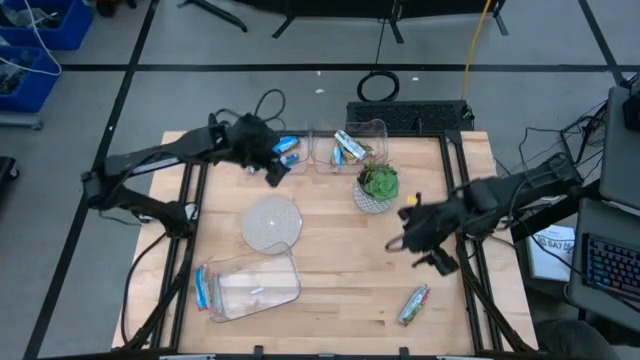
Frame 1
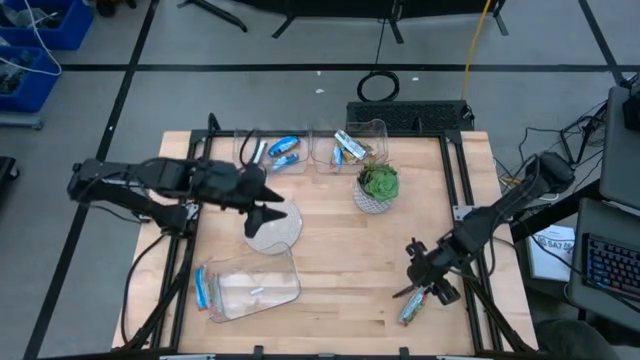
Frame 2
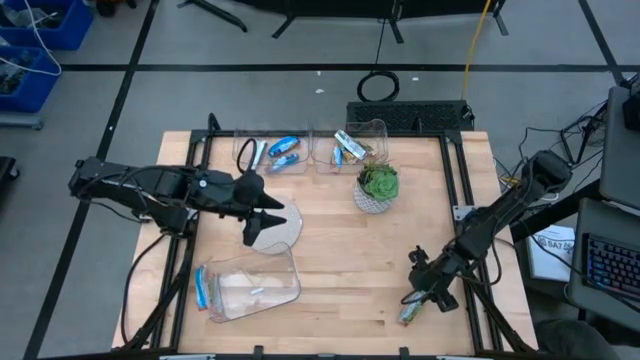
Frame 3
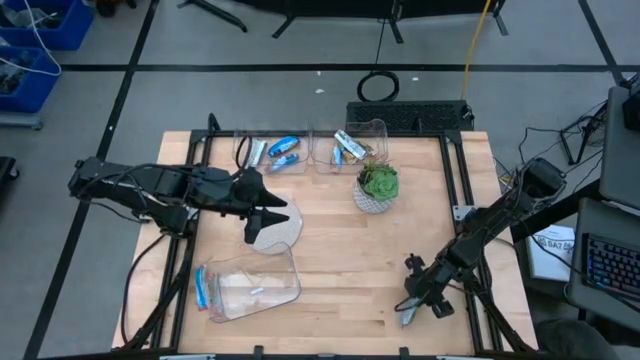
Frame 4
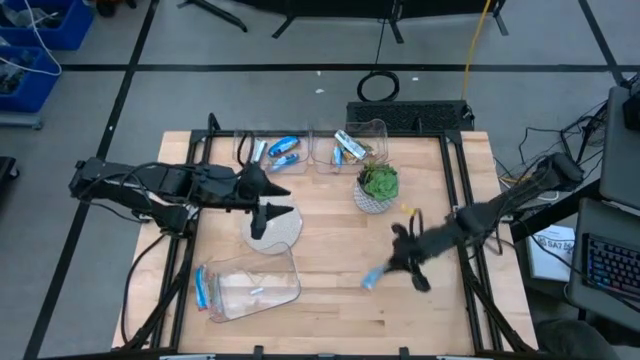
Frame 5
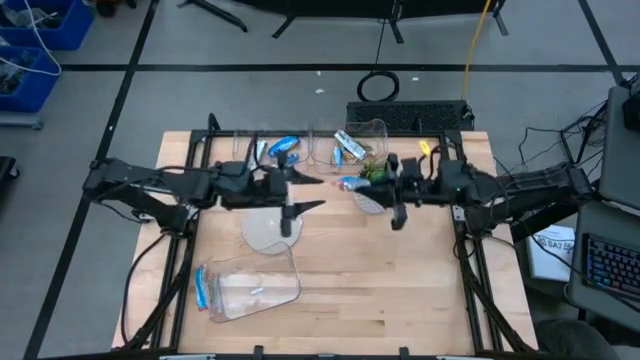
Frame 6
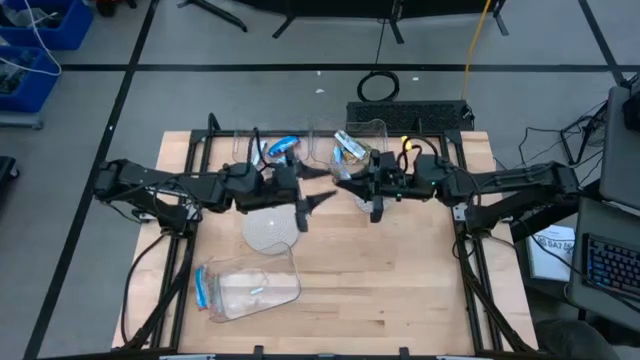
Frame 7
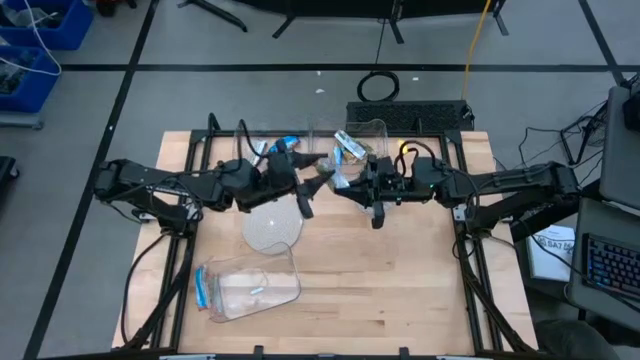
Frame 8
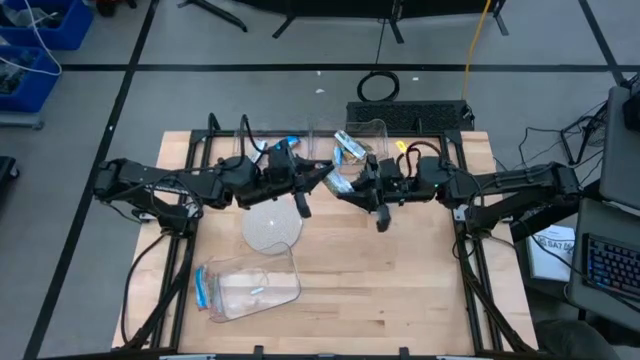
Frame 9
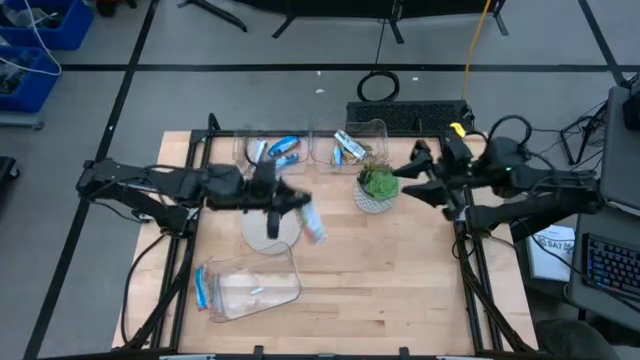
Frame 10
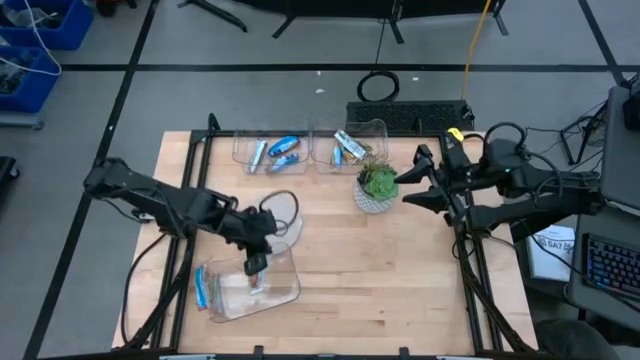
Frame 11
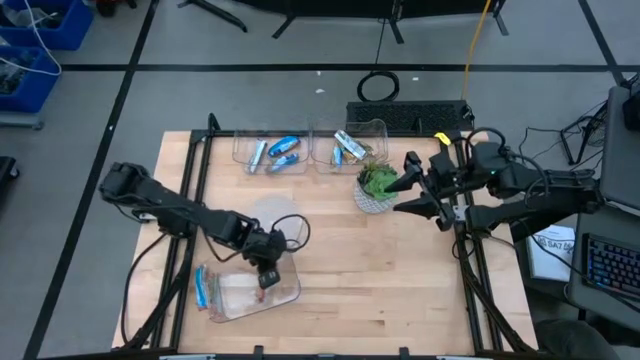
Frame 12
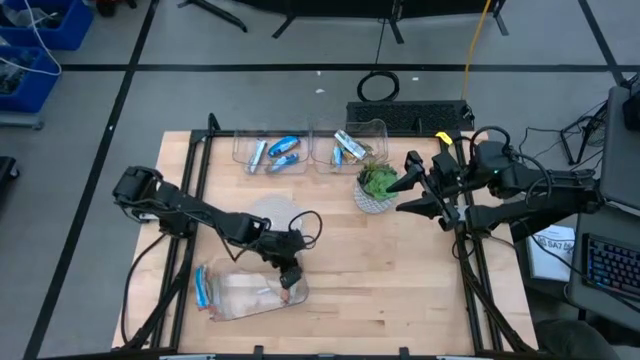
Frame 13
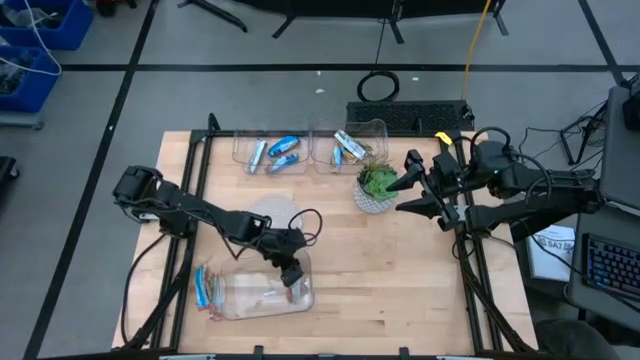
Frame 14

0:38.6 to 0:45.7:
Task: Pick and place Granola Bars by type
Put the red granola bar into the bottom transparent bin

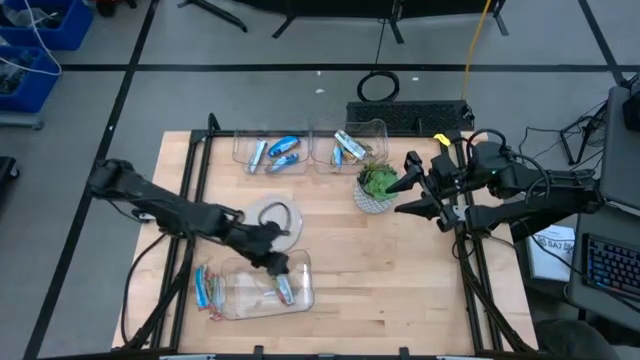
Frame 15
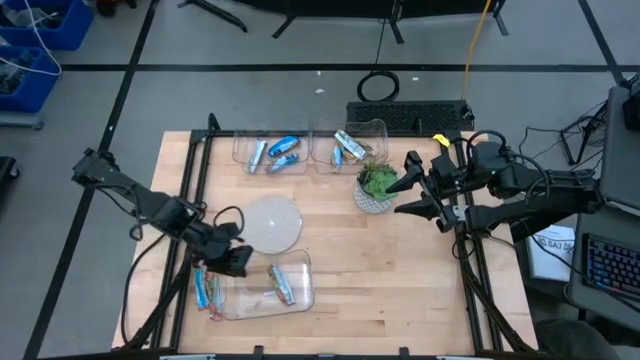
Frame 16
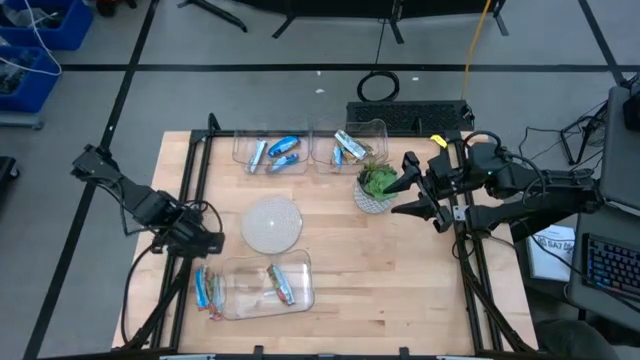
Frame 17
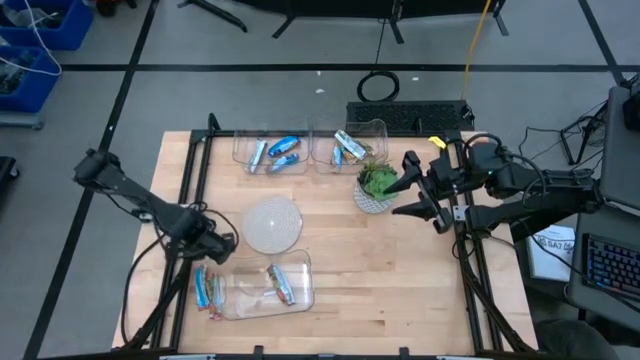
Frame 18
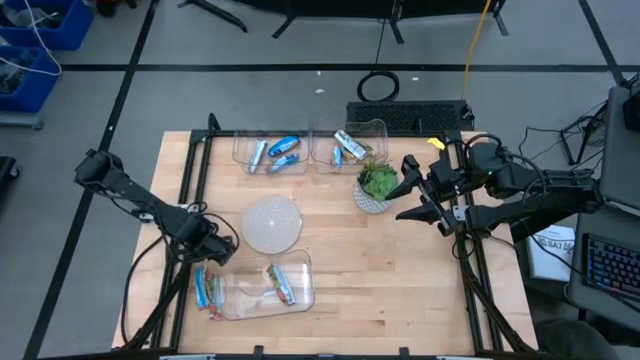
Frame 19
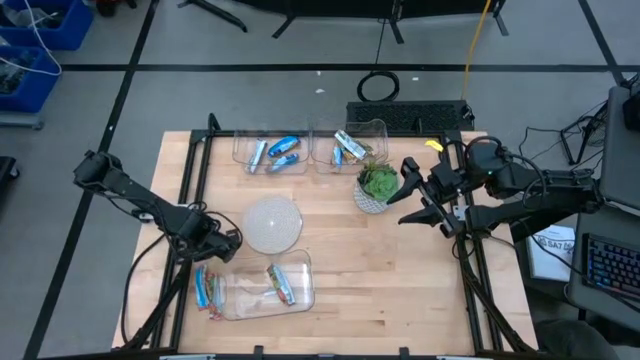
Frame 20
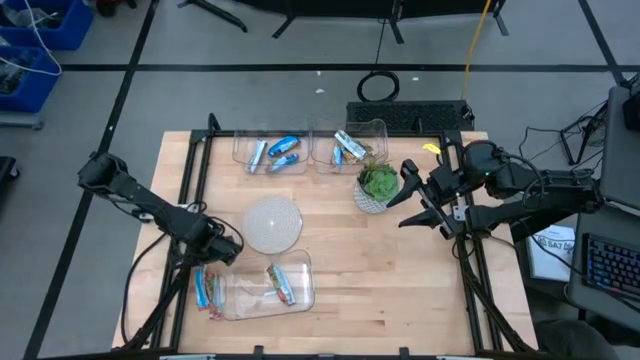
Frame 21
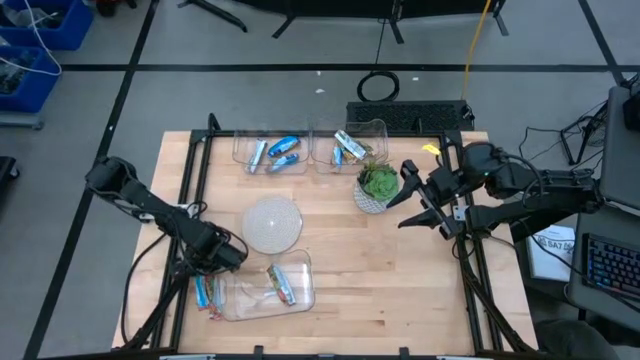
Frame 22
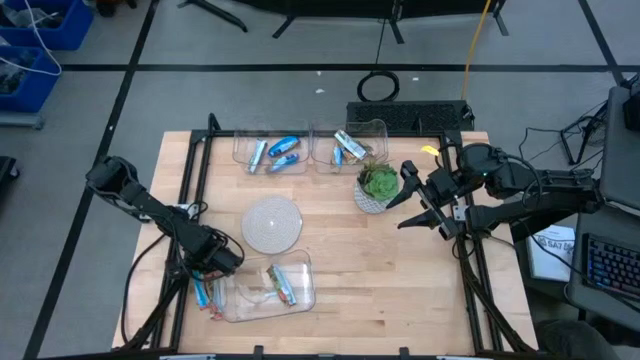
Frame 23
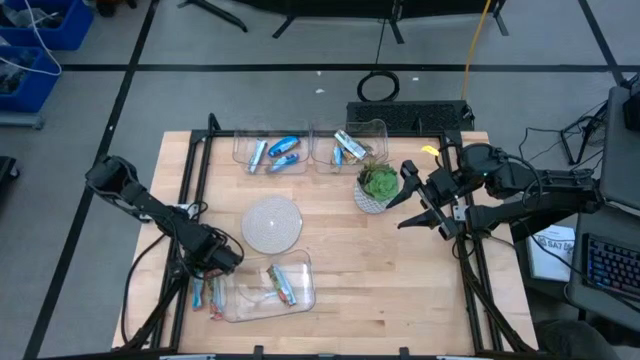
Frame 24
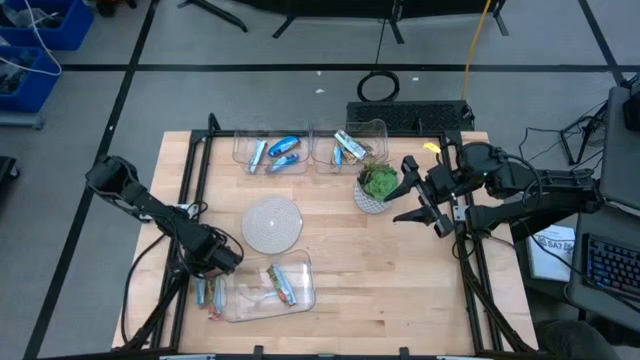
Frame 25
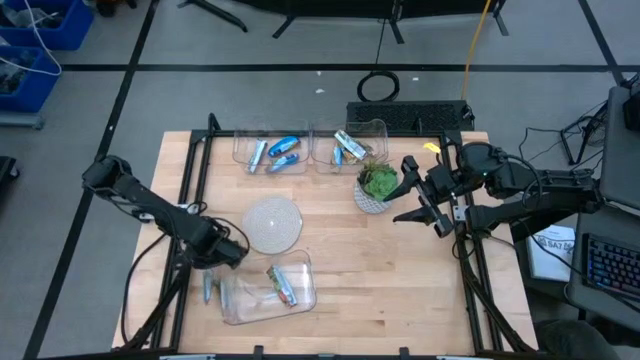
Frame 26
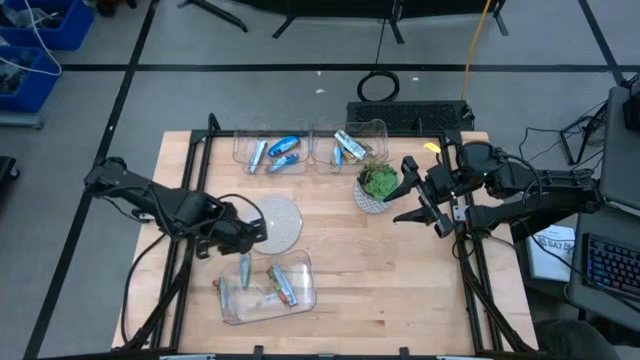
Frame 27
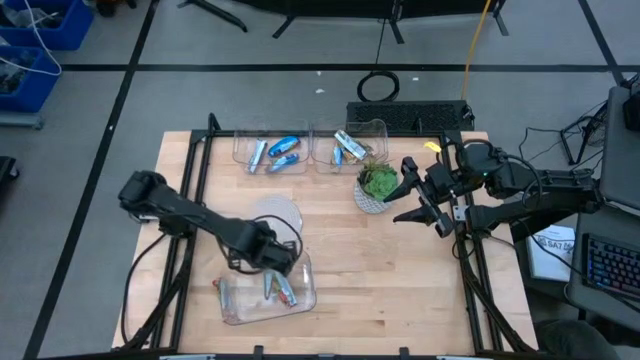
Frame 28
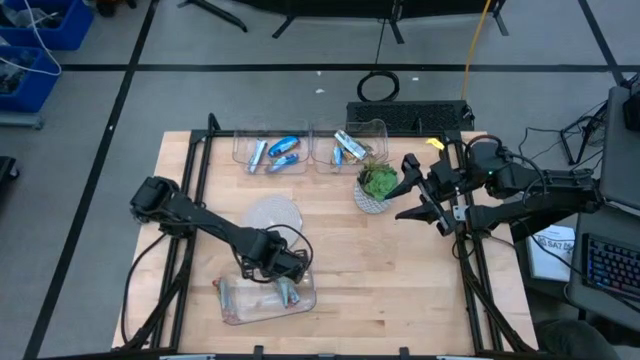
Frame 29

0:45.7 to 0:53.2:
Put the red granola bar into the bottom transparent bin

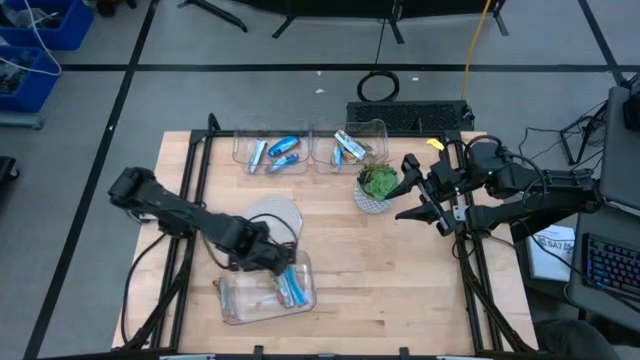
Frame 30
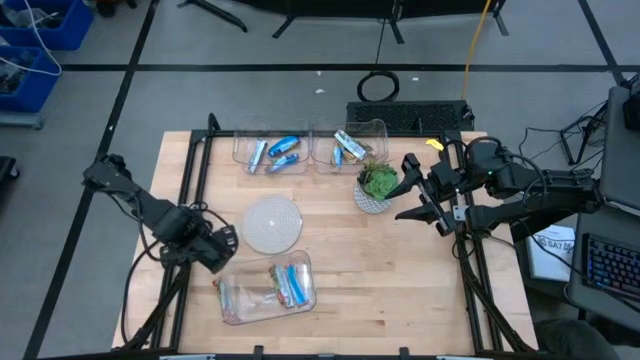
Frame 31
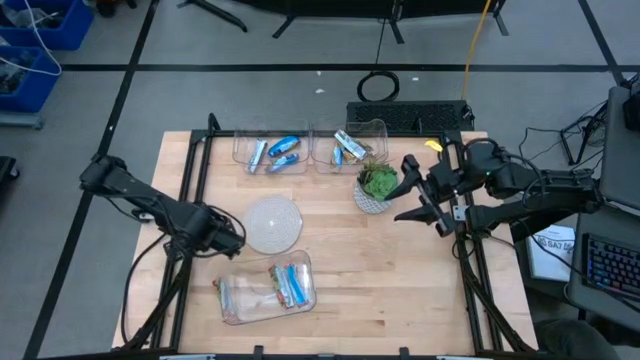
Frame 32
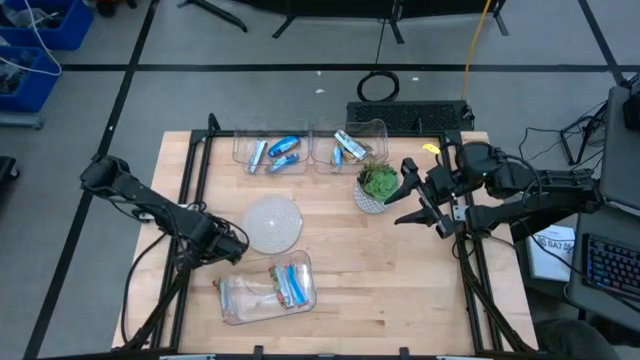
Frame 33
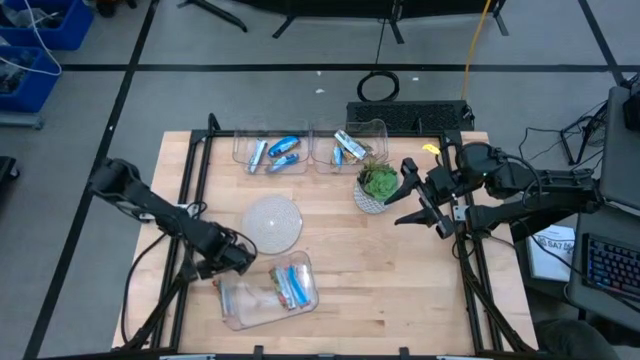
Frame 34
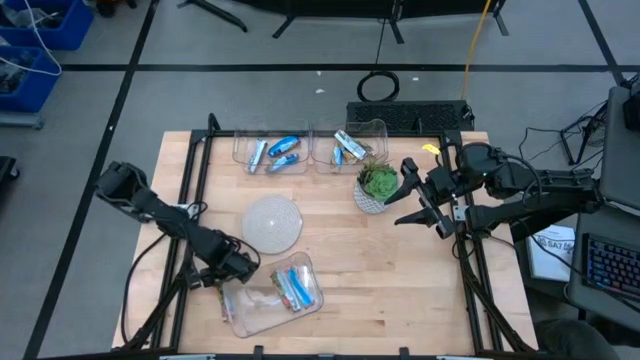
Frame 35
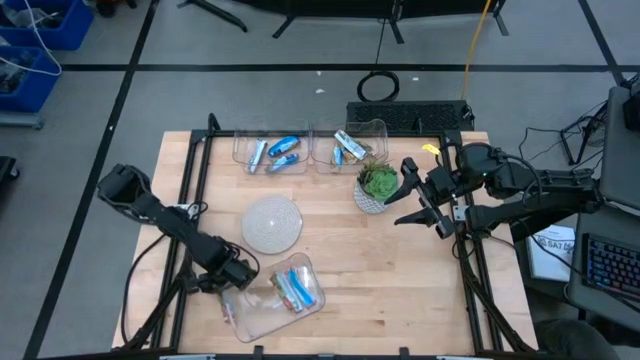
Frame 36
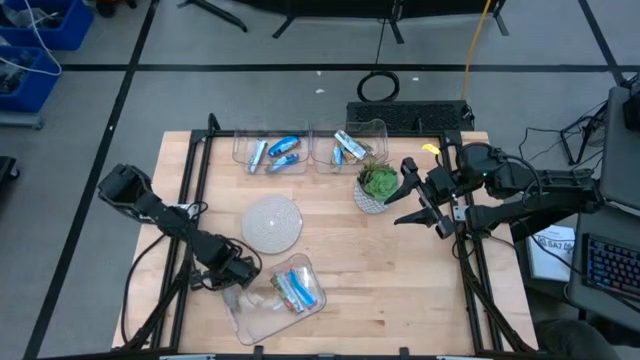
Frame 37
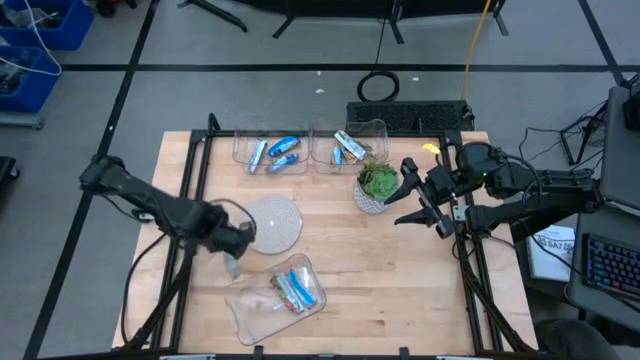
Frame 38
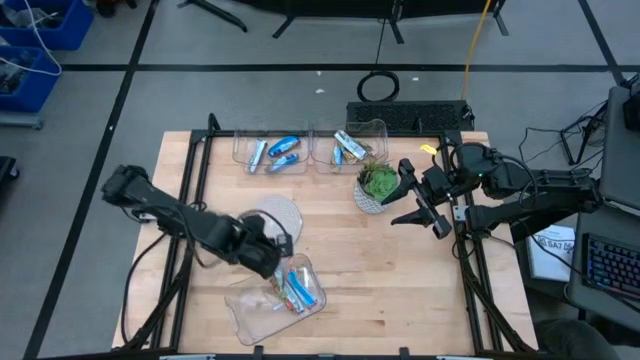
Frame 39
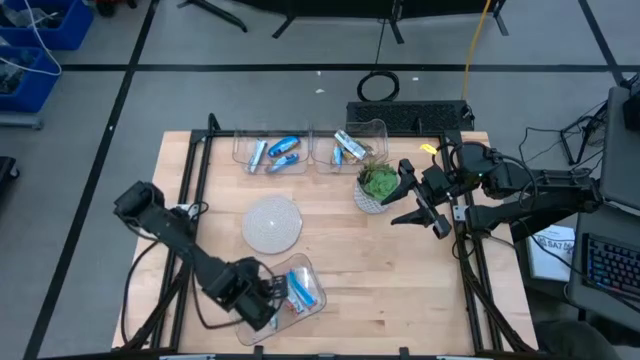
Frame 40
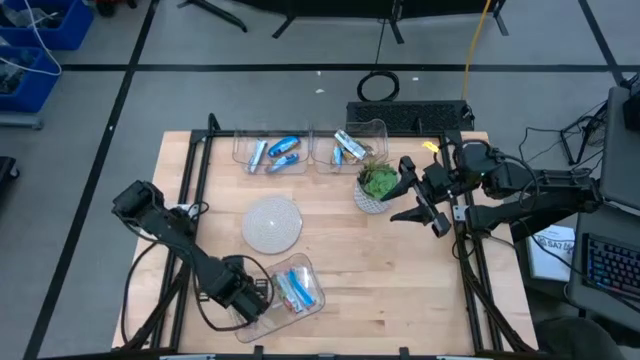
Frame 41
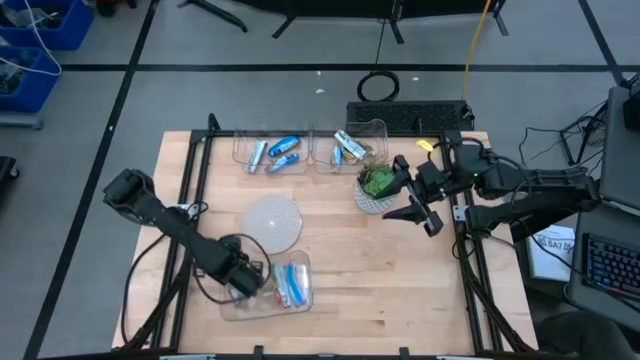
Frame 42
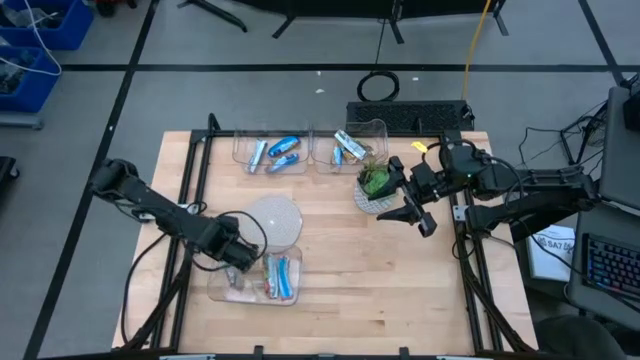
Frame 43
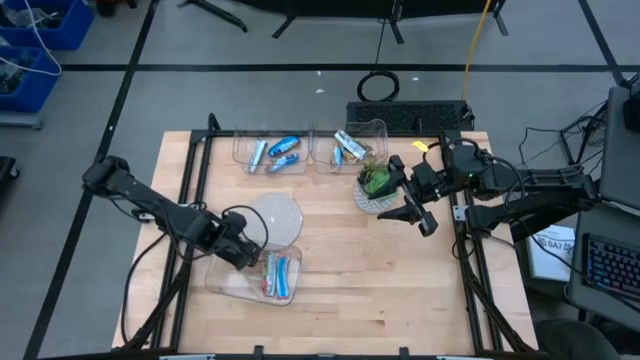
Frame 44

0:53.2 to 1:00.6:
Put the red granola bar into the bottom transparent bin
